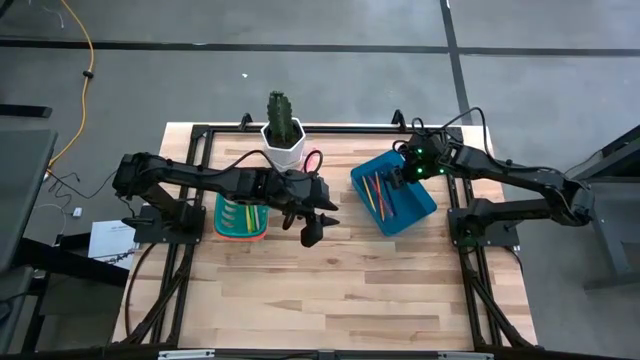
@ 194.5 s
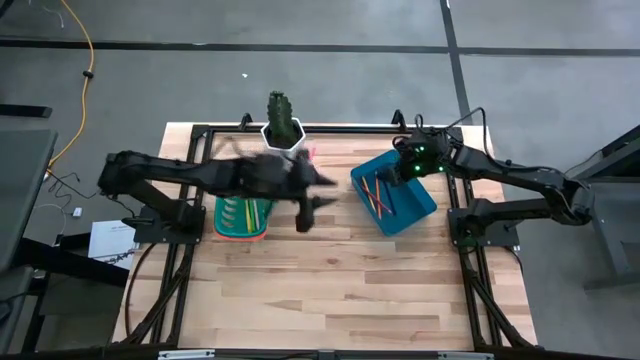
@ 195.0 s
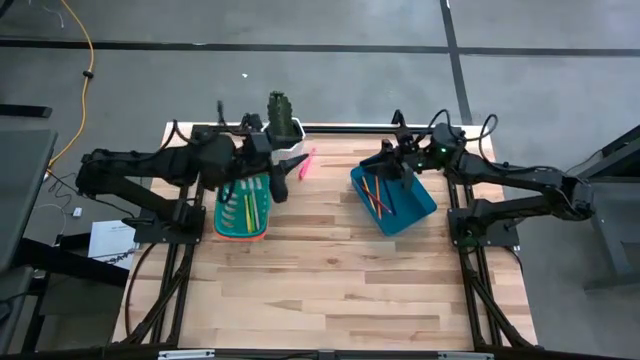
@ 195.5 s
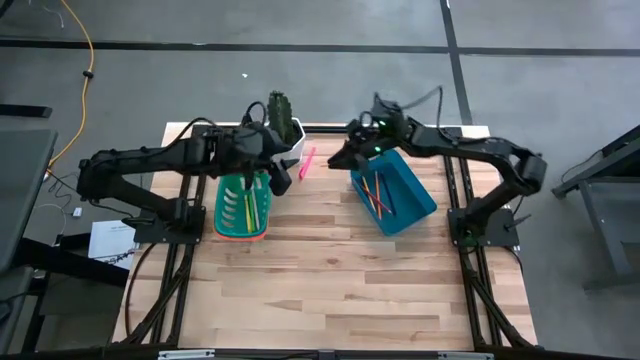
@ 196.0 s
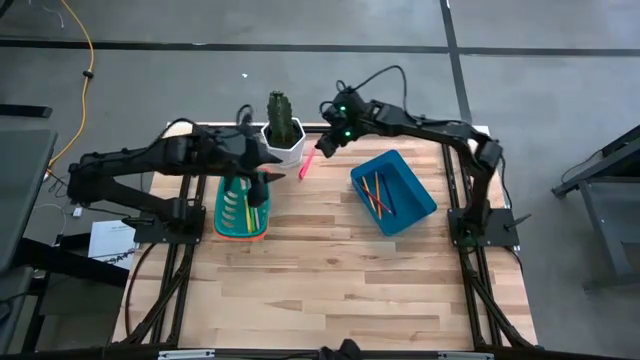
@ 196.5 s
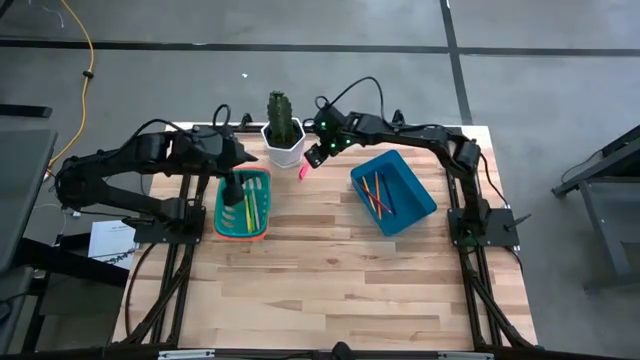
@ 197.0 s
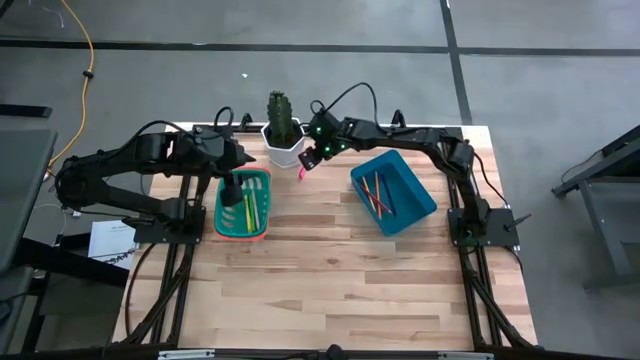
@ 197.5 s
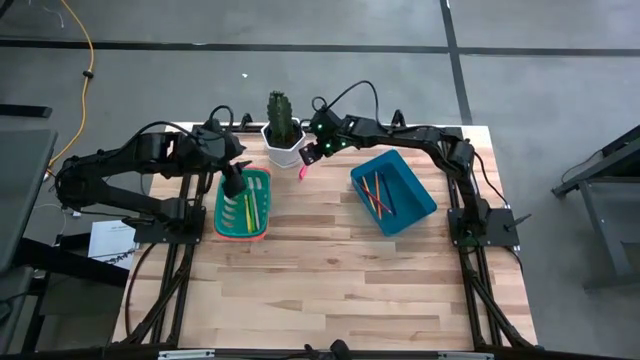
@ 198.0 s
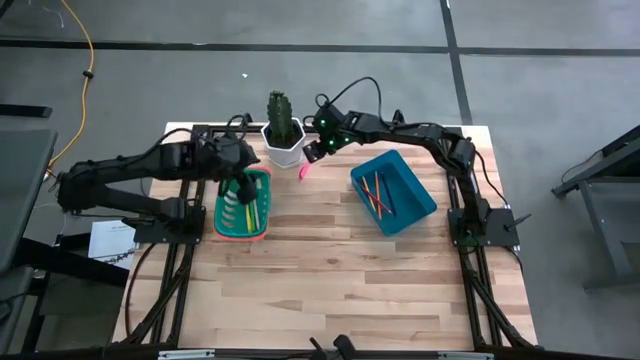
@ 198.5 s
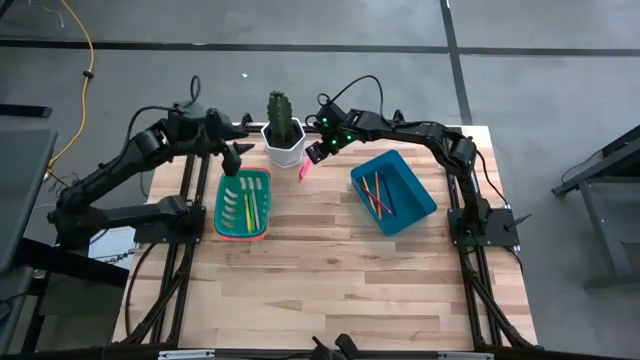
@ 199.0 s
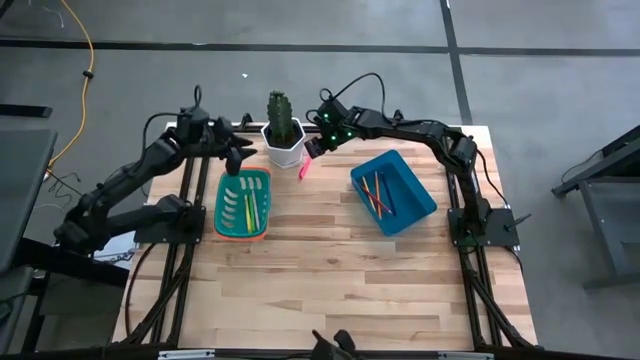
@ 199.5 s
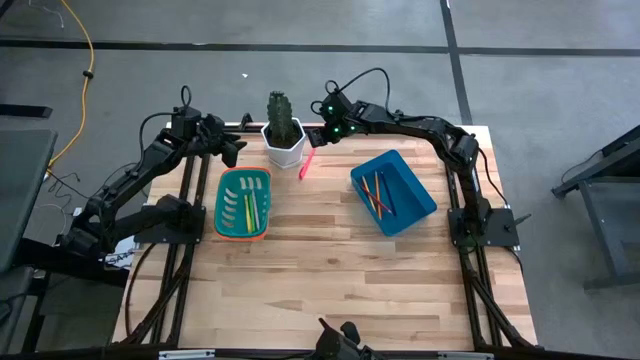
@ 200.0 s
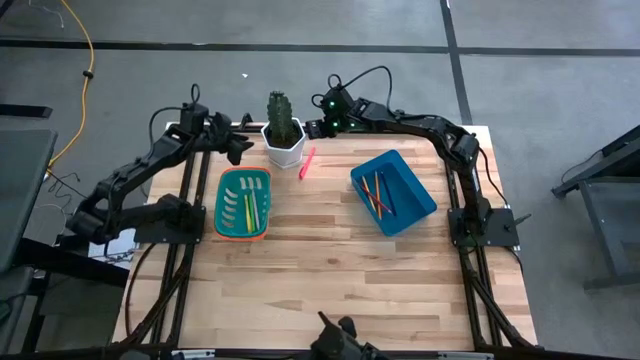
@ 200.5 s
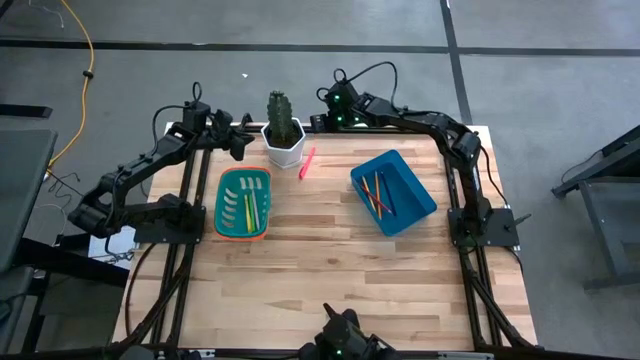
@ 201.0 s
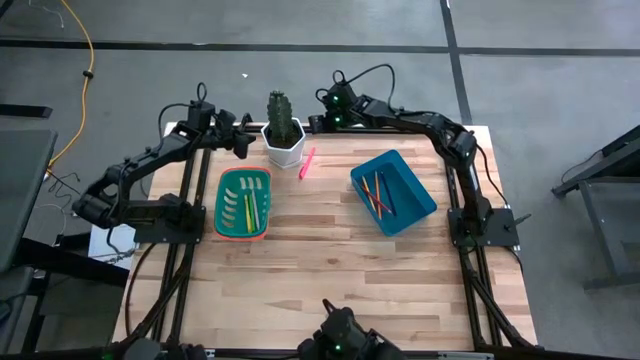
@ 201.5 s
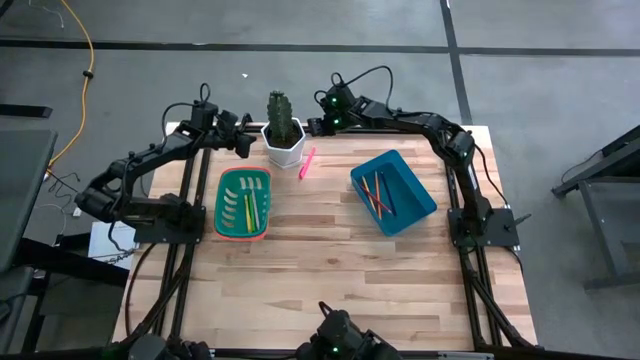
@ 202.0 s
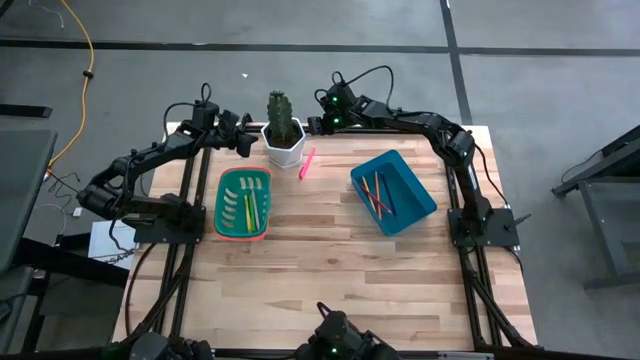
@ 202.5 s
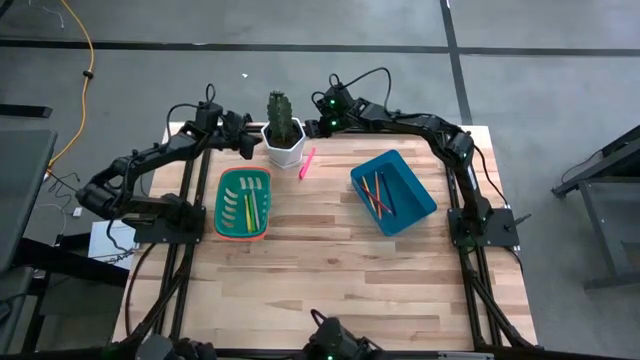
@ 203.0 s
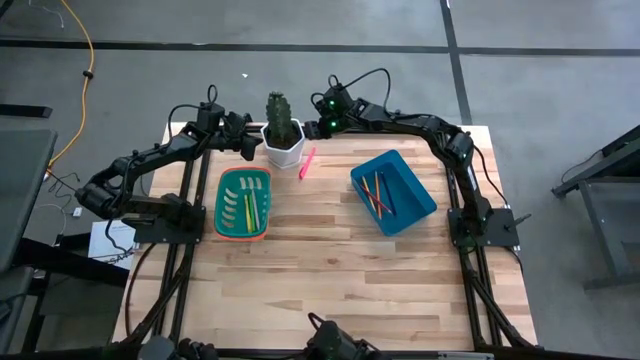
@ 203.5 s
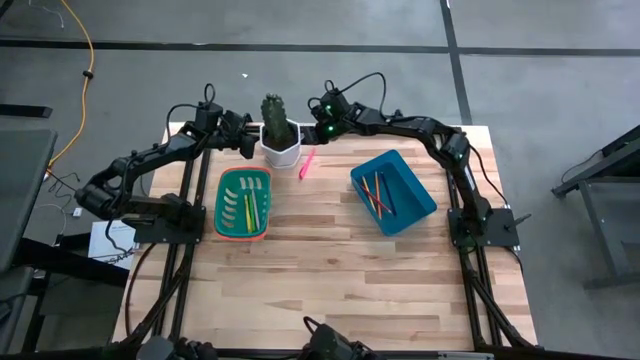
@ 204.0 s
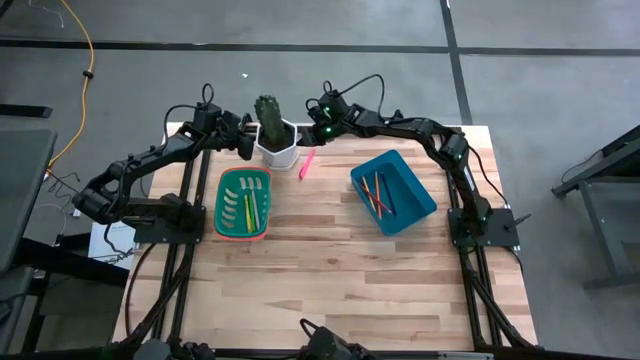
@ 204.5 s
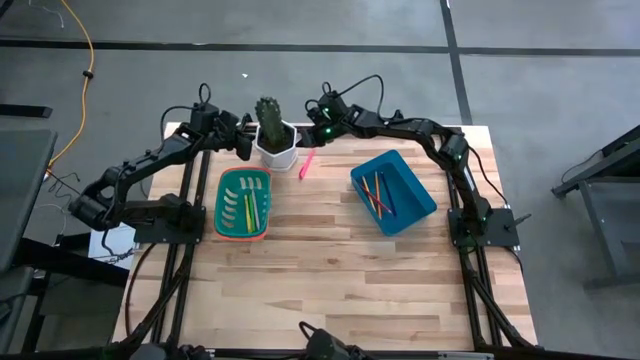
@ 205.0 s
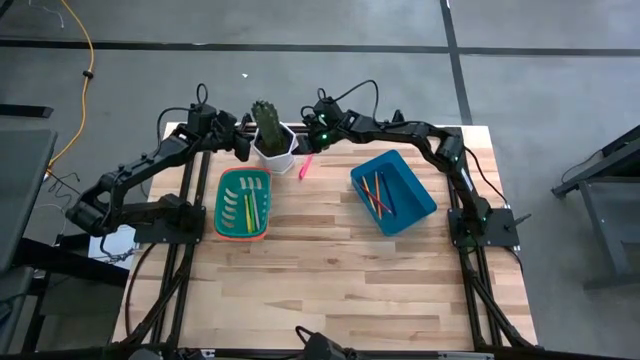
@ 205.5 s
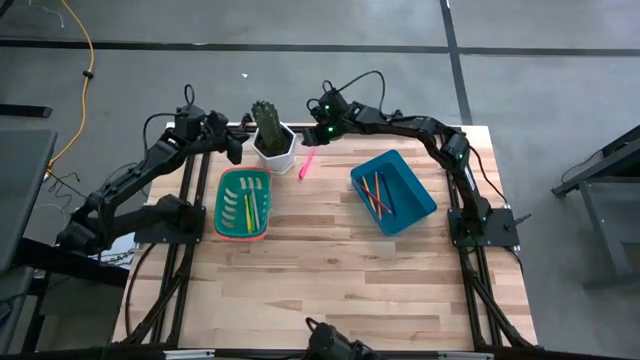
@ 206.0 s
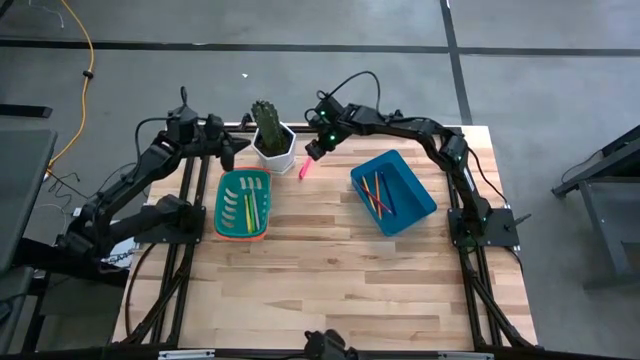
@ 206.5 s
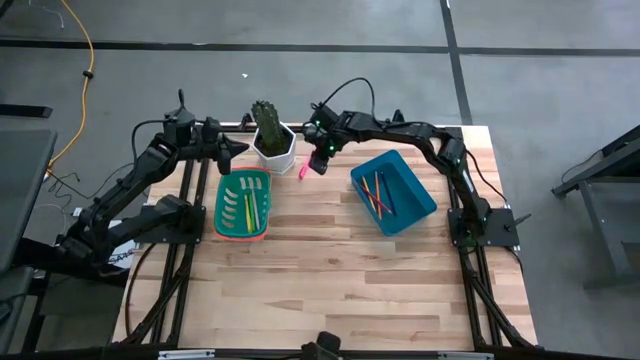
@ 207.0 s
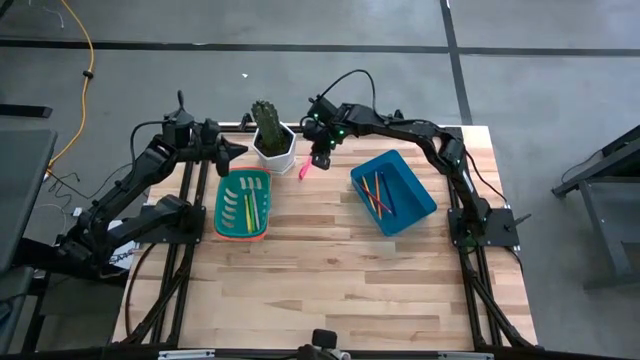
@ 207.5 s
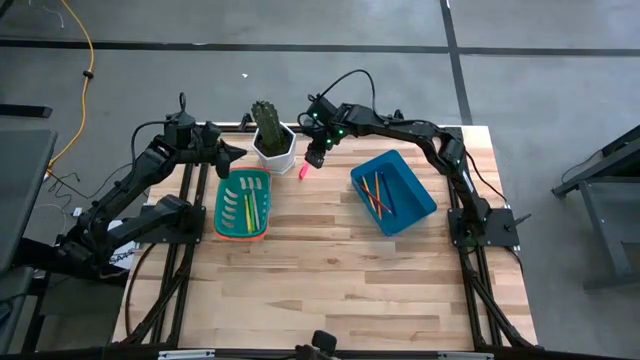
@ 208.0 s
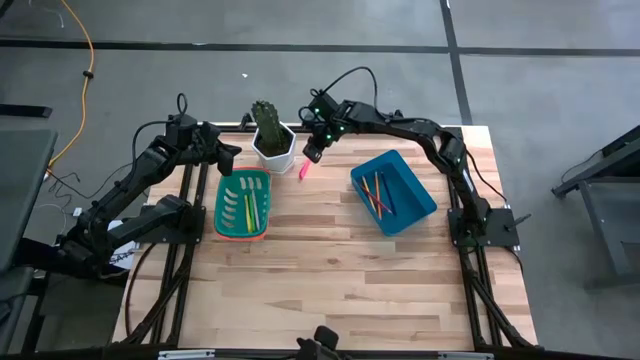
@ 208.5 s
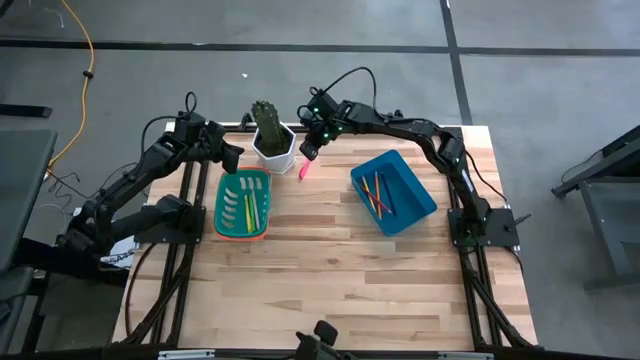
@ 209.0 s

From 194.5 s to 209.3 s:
Task: Sort pens & pencils
Adjust the potted plant on the table
